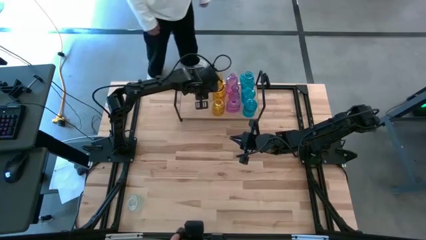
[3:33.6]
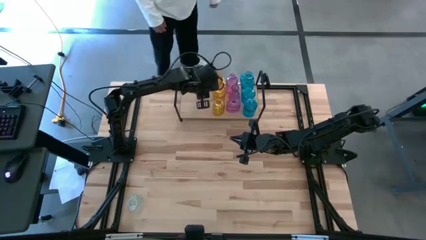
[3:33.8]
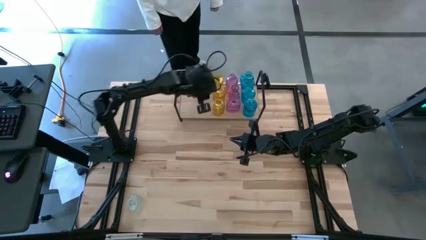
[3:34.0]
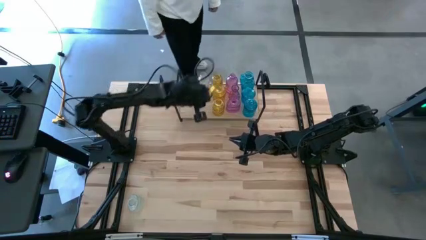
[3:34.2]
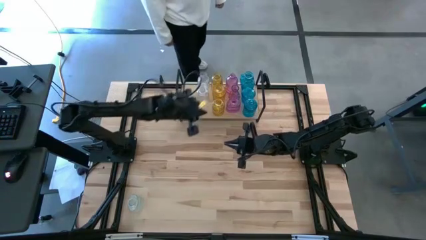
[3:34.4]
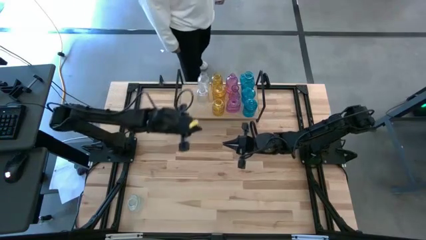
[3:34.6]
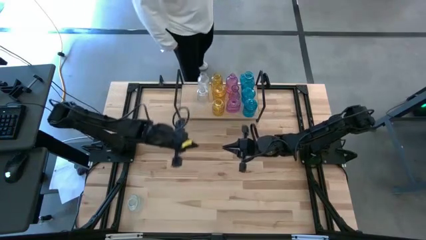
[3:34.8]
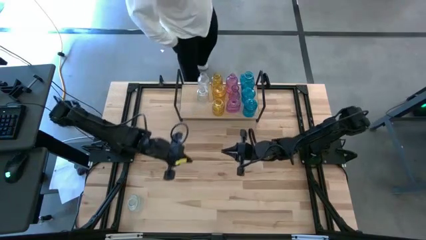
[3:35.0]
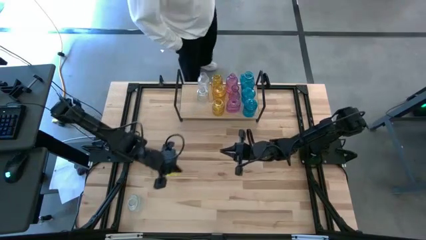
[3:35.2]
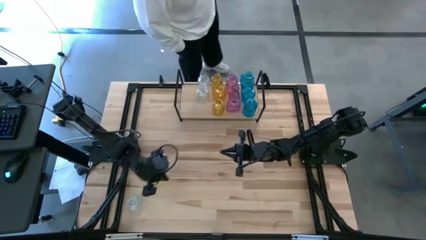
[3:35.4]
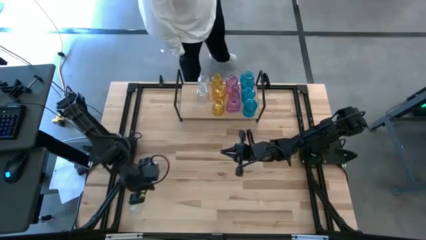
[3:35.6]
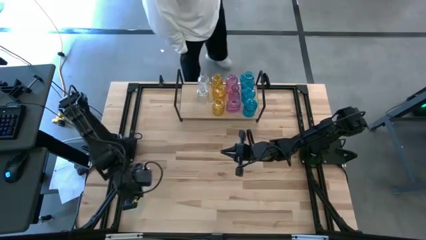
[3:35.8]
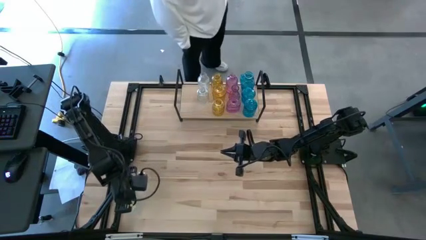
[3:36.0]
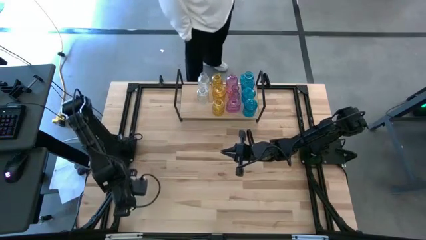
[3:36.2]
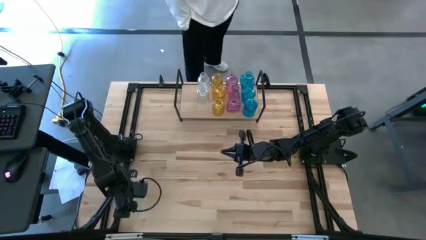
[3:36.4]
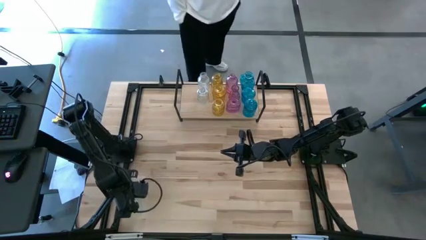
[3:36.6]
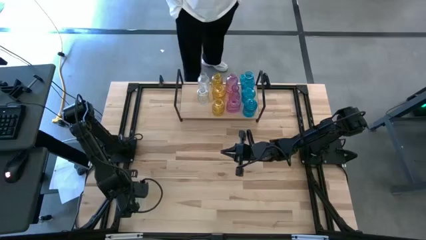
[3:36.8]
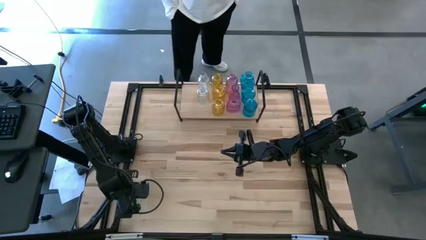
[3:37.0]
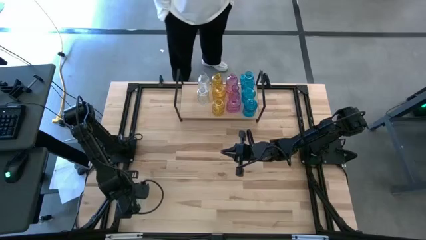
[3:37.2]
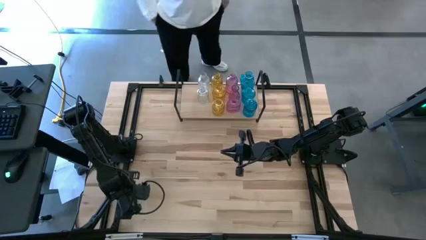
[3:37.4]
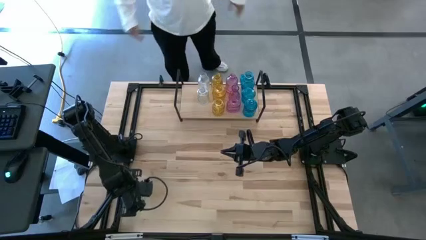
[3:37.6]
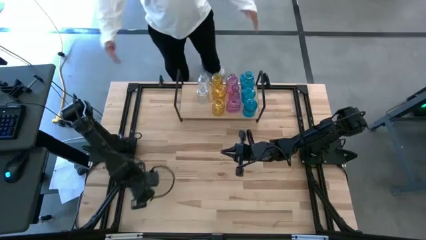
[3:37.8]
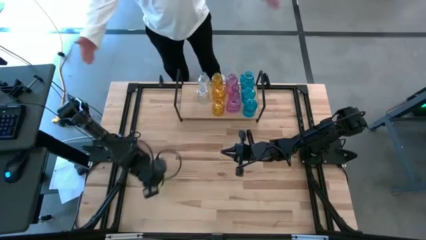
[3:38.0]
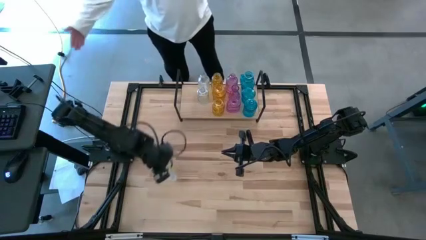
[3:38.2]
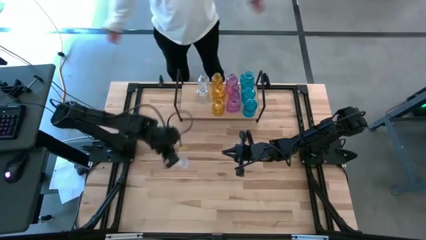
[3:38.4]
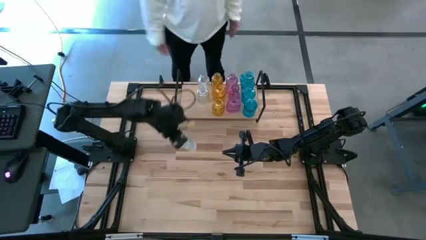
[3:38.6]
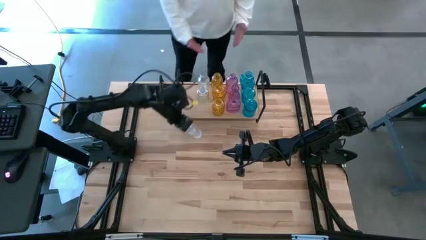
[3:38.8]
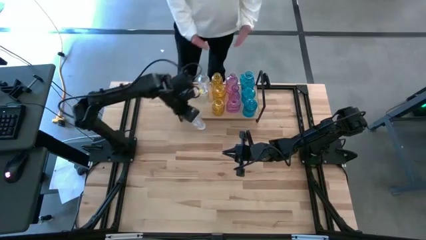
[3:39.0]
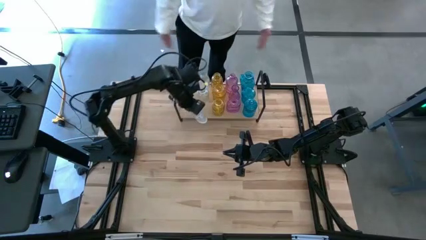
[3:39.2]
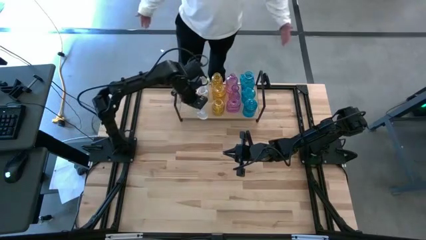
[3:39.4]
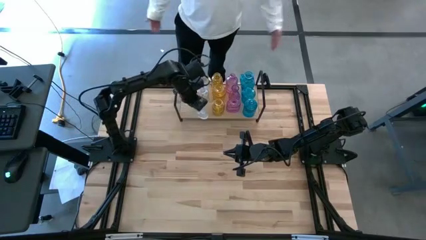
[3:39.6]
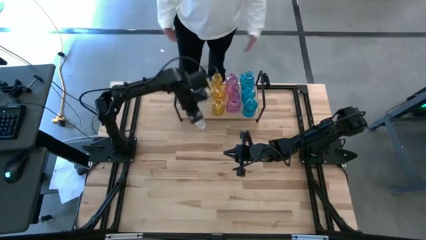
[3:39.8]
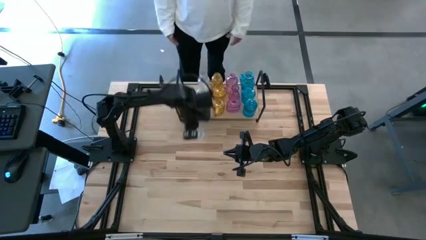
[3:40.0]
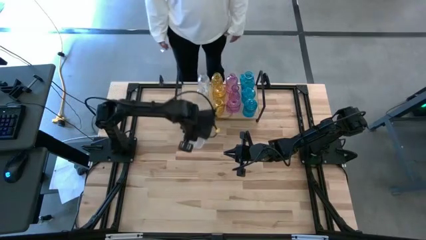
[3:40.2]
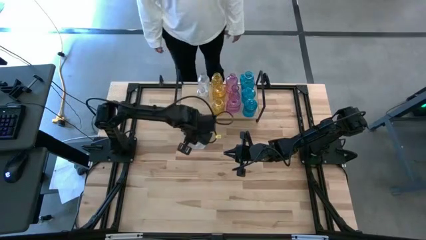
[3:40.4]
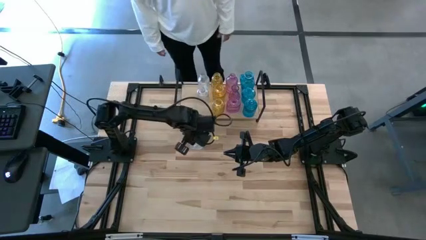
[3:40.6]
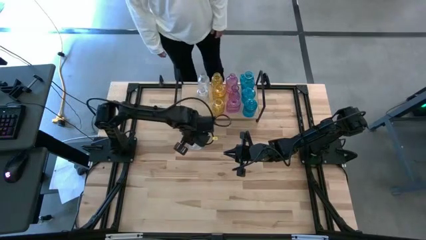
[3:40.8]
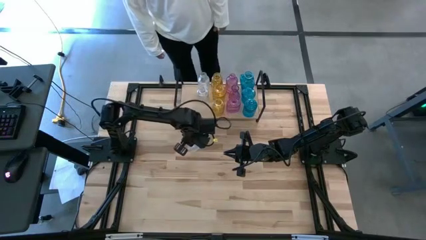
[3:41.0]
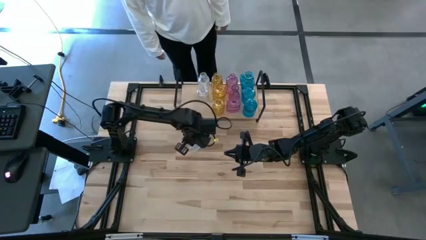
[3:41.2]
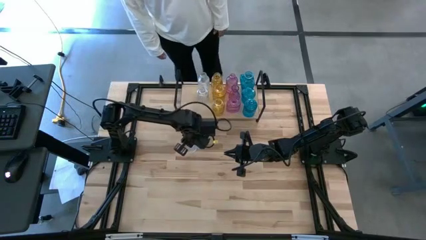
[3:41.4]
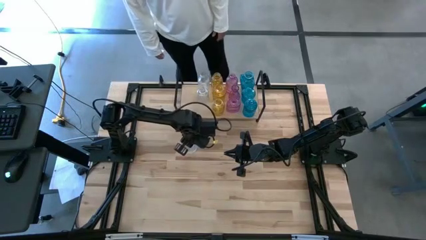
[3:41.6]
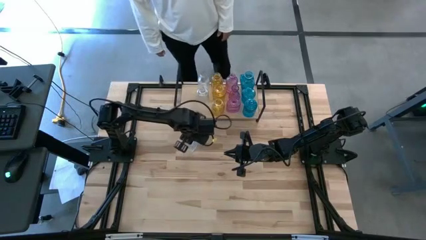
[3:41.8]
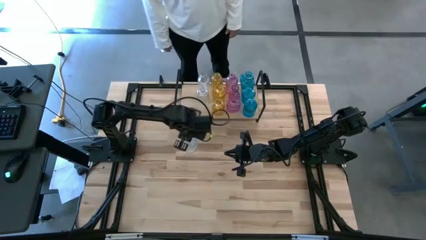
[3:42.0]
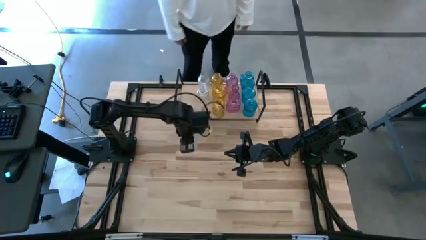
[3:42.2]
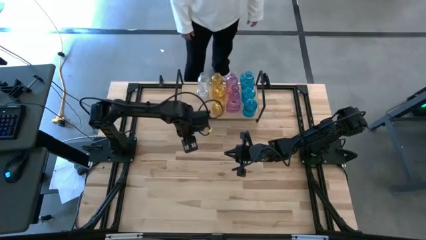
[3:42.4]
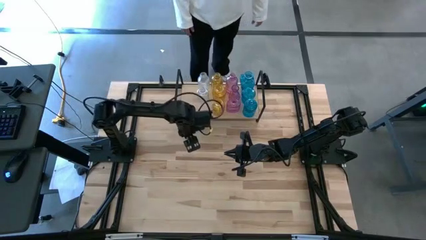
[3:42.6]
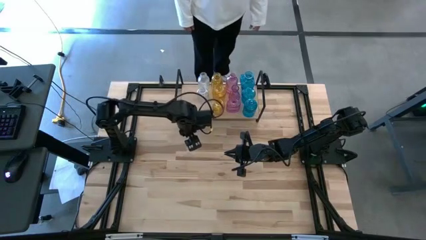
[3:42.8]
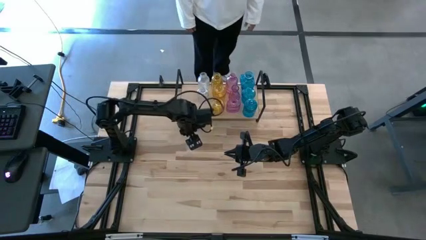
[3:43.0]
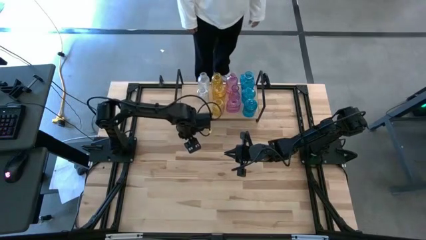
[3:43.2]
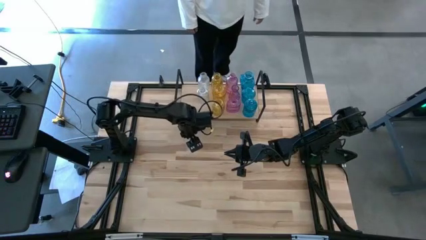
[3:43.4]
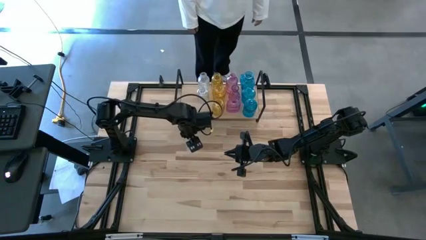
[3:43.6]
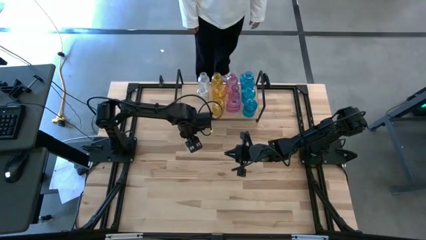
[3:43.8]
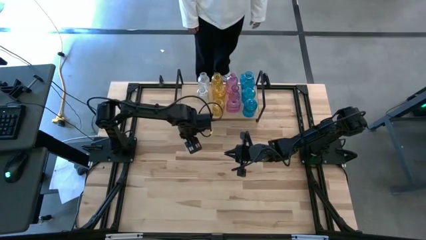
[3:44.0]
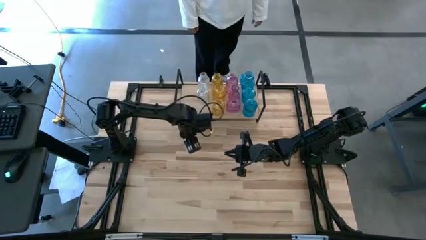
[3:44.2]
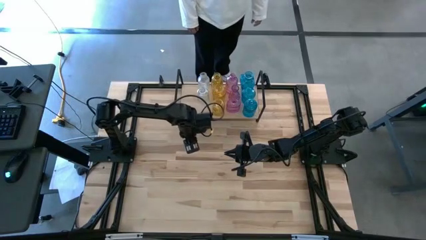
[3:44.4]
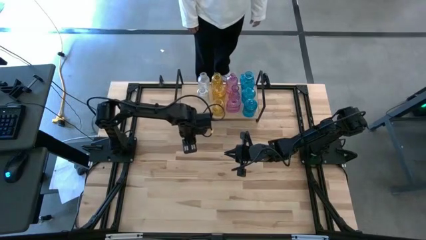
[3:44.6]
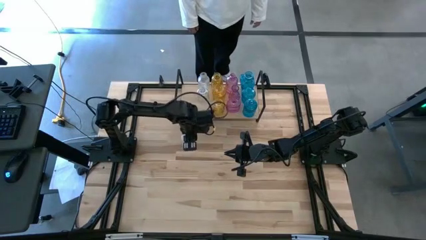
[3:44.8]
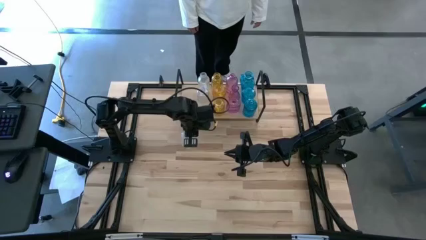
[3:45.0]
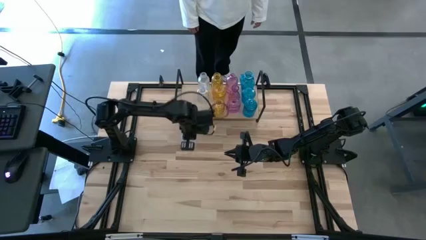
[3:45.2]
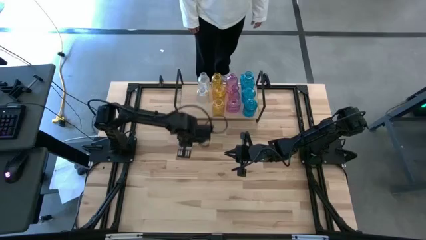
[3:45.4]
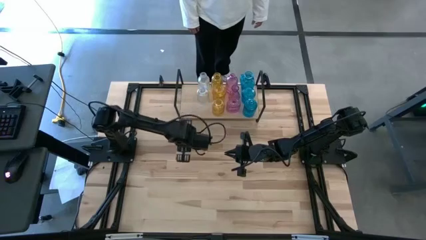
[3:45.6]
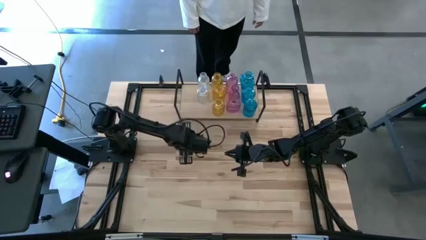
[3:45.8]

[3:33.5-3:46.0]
Task: sort vases onto shelf
Put the transparent vase on the shelf aligned with the other transparent vases

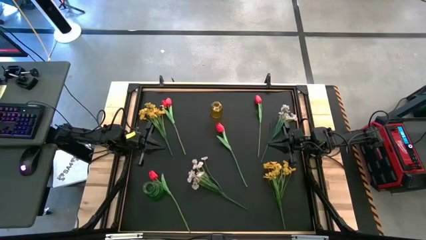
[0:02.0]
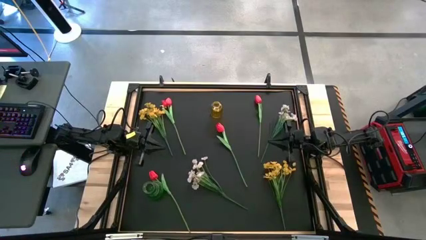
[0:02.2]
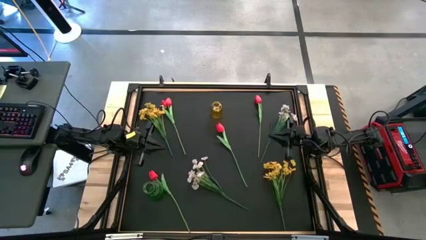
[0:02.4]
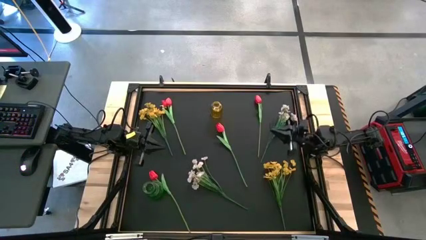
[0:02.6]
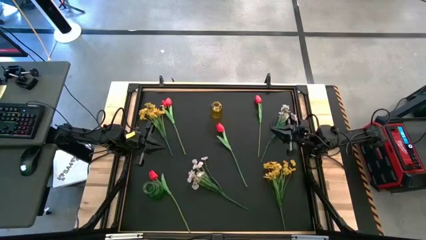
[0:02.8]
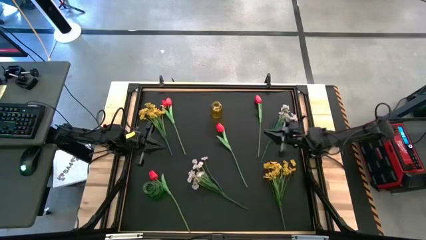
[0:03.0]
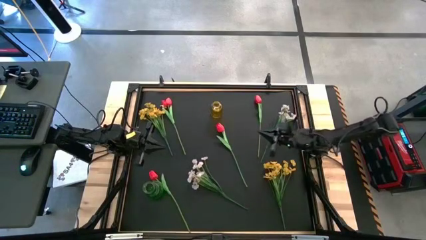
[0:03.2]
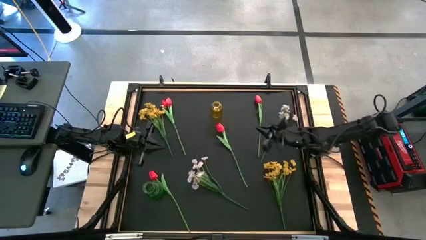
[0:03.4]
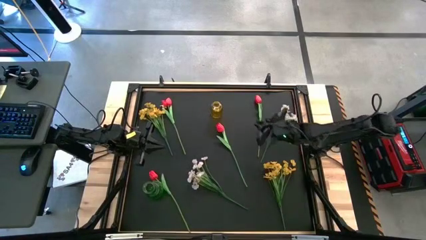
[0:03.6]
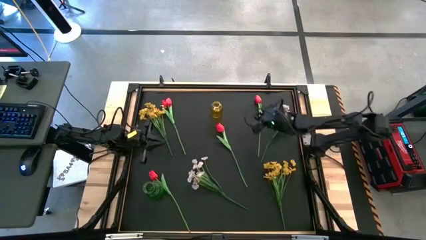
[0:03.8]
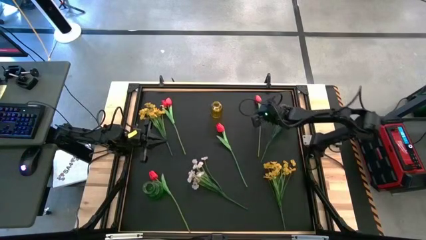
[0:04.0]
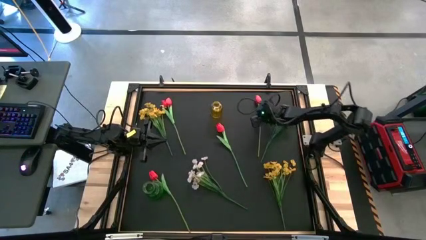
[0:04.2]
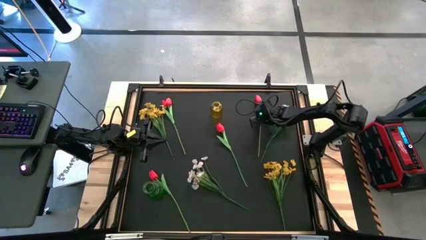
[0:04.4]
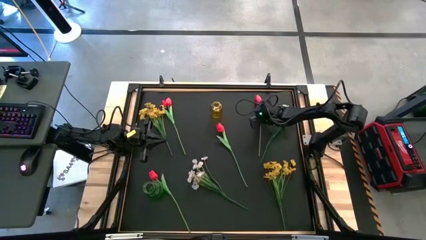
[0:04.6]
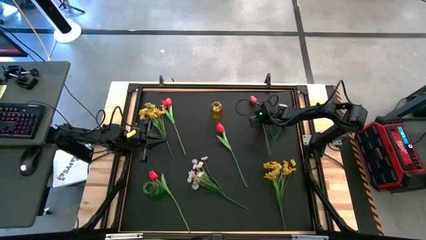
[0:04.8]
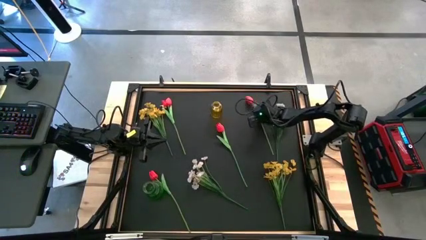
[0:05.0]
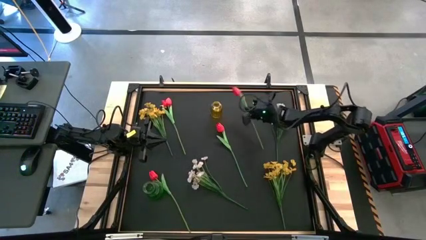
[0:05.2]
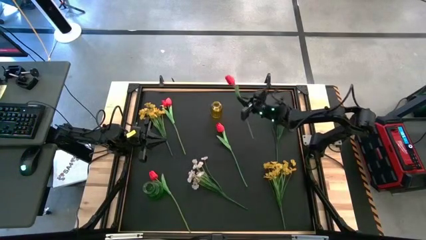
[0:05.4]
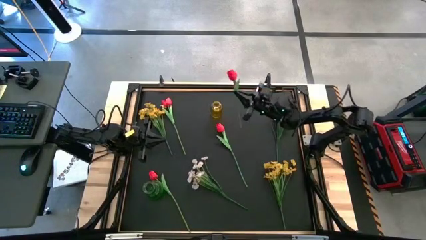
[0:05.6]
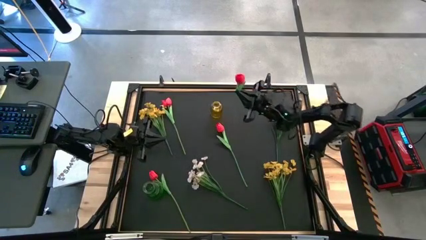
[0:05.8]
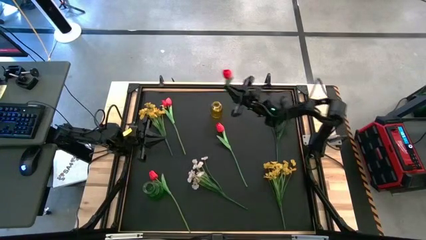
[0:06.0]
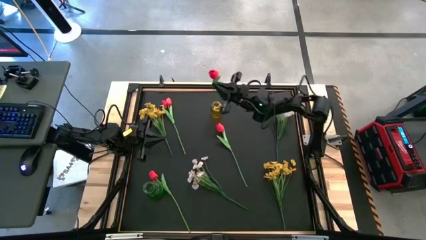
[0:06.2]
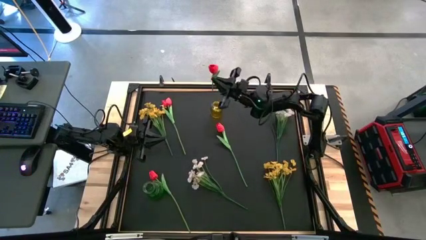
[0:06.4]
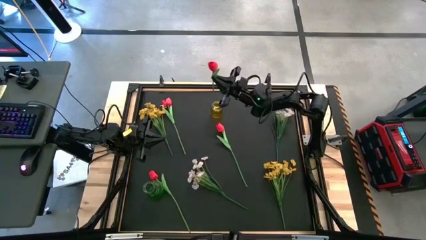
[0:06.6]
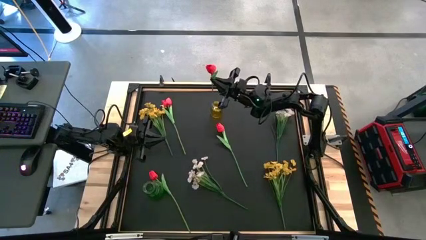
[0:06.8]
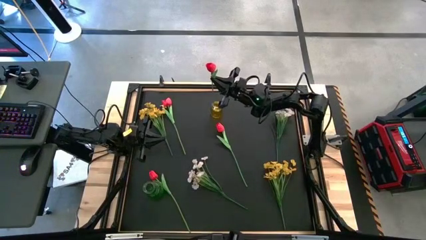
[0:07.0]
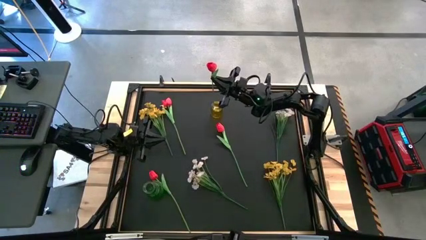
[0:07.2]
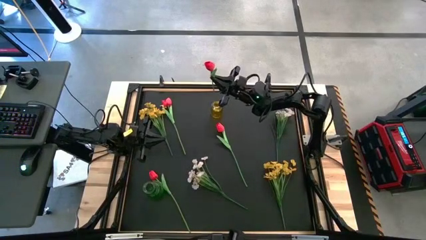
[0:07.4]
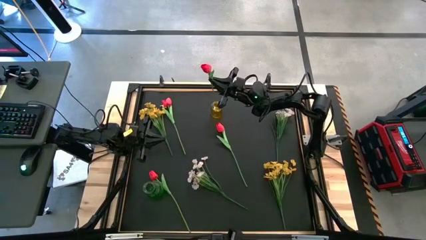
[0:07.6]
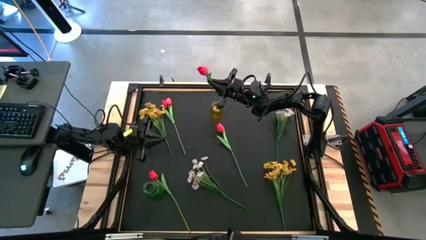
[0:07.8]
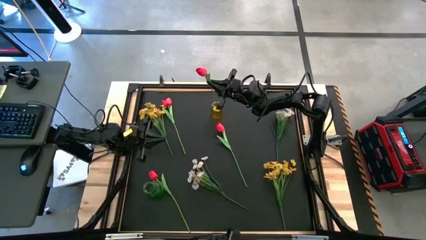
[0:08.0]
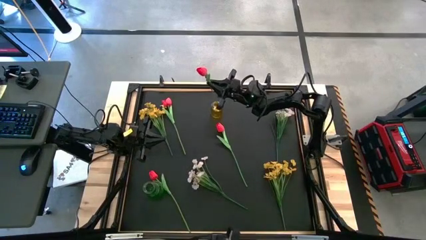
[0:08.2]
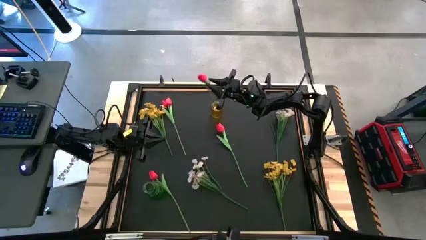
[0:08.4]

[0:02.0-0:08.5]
Task: Sort flowers into vase by color
Put the red flower into the yellow vase
